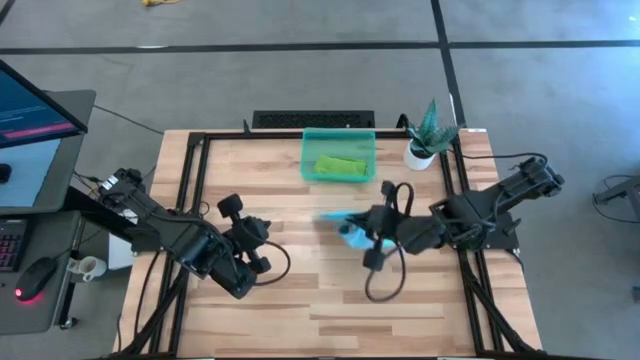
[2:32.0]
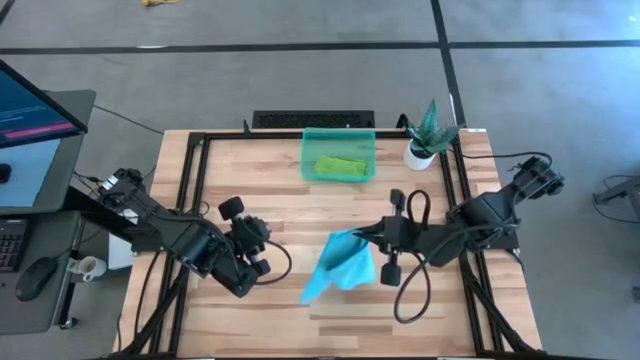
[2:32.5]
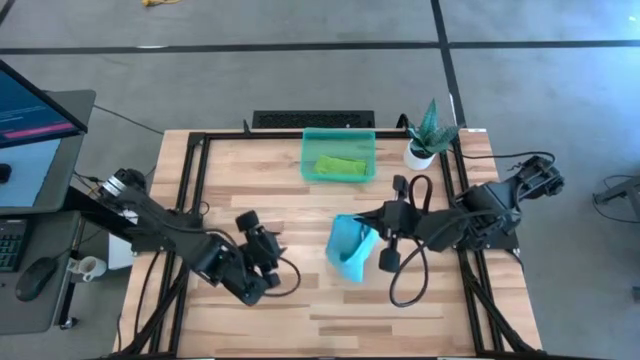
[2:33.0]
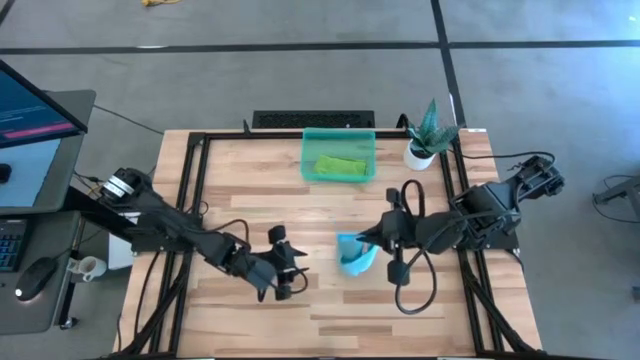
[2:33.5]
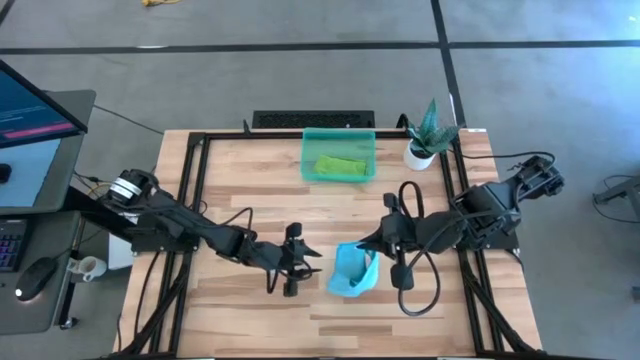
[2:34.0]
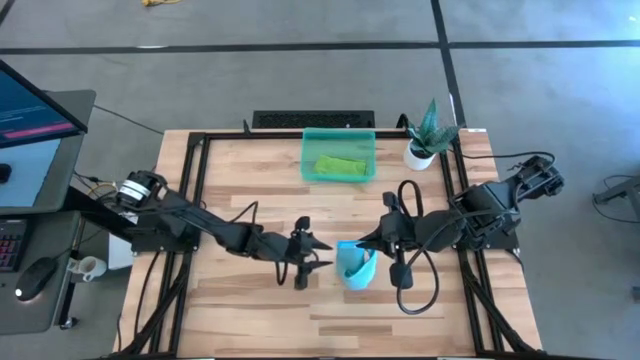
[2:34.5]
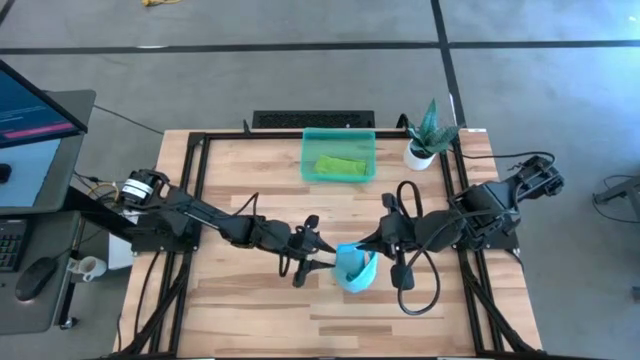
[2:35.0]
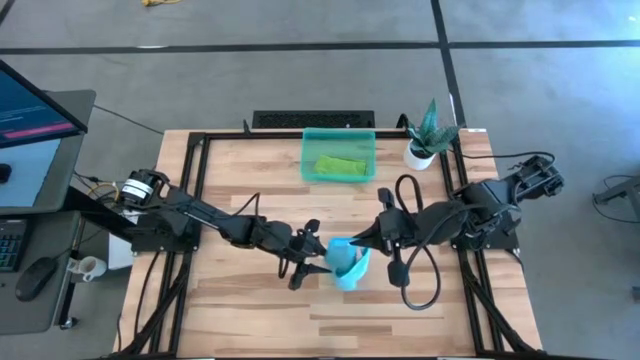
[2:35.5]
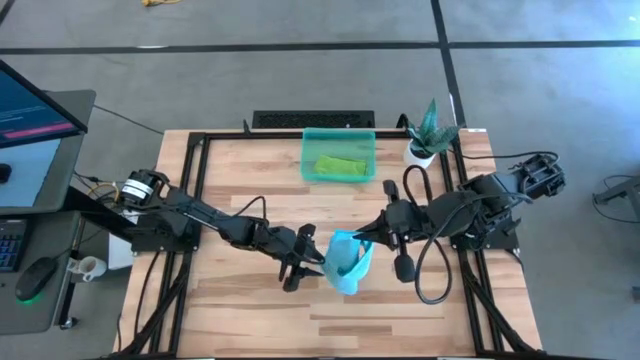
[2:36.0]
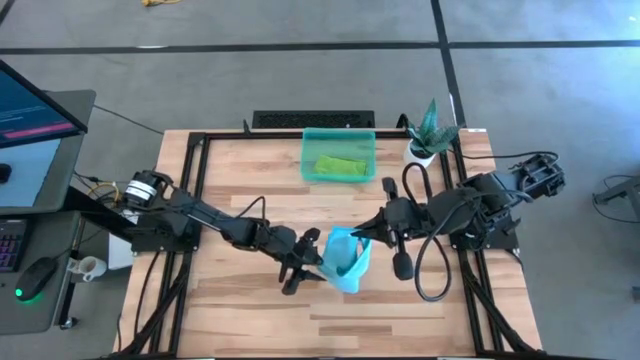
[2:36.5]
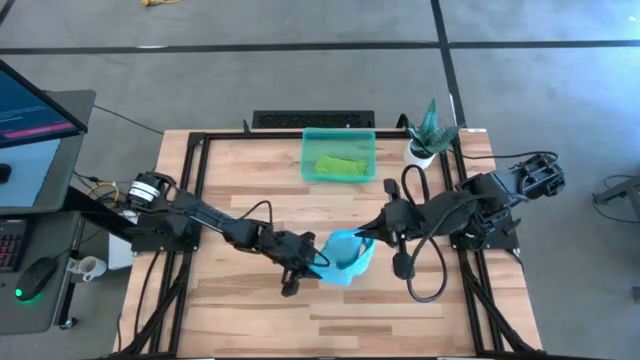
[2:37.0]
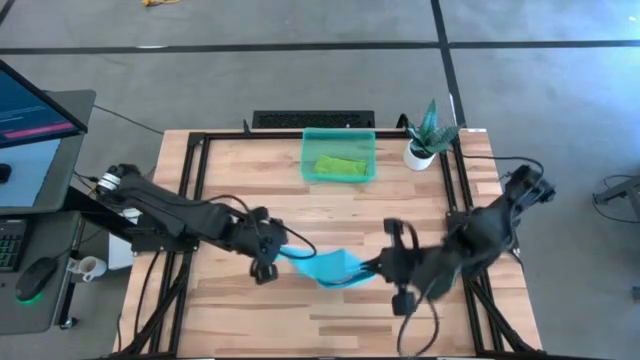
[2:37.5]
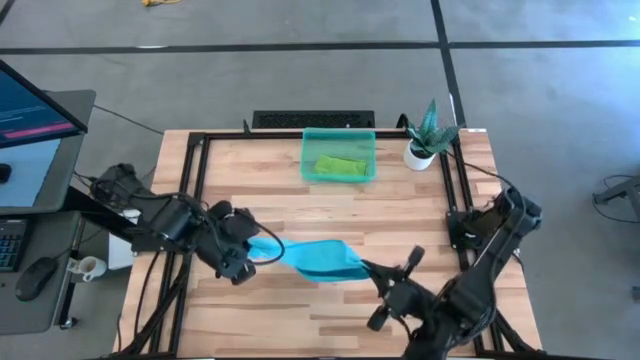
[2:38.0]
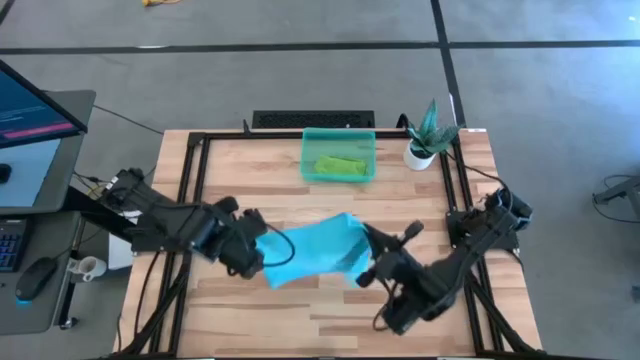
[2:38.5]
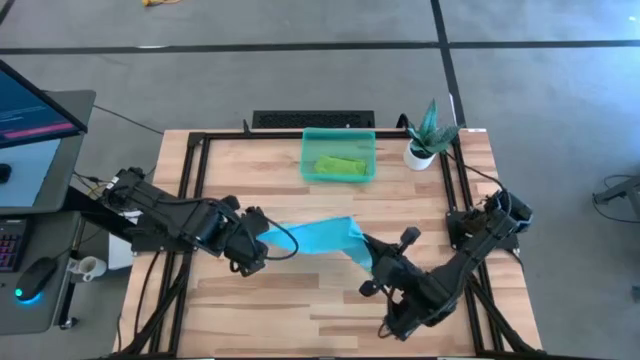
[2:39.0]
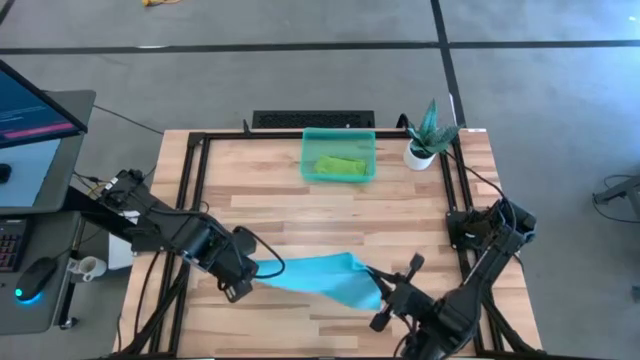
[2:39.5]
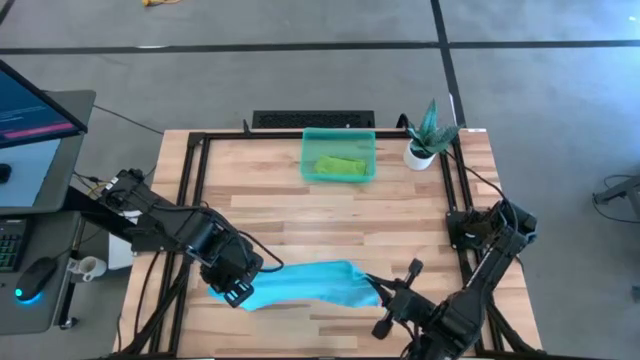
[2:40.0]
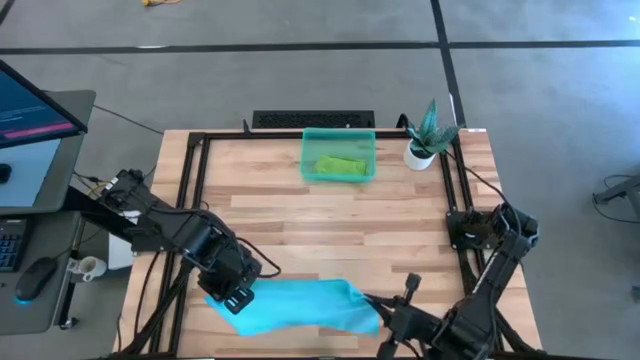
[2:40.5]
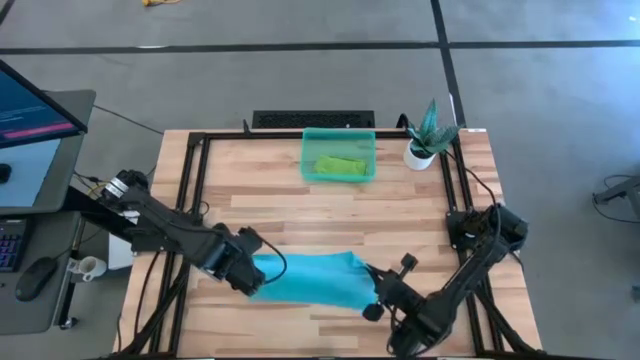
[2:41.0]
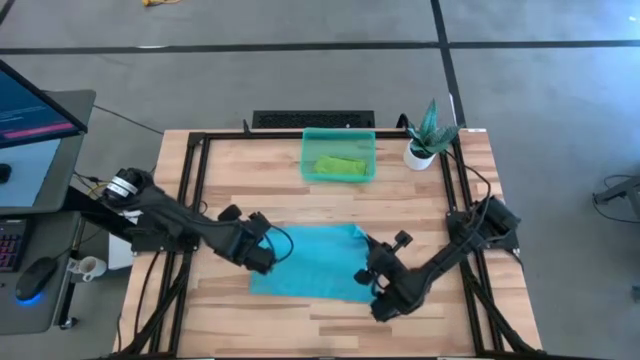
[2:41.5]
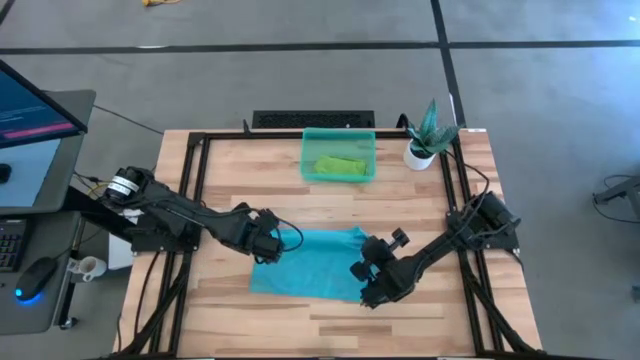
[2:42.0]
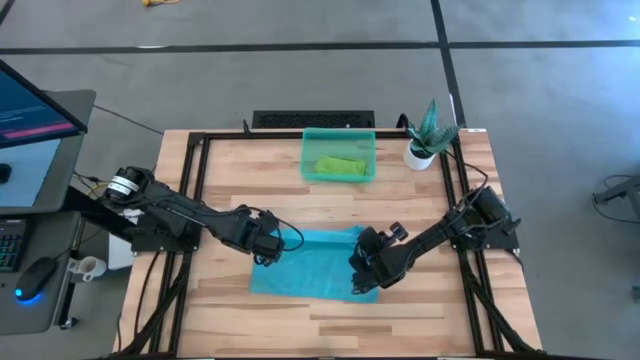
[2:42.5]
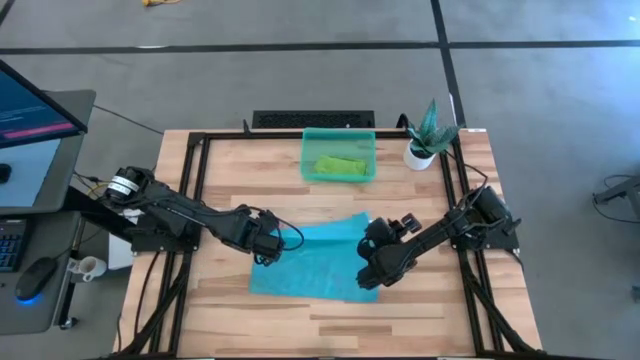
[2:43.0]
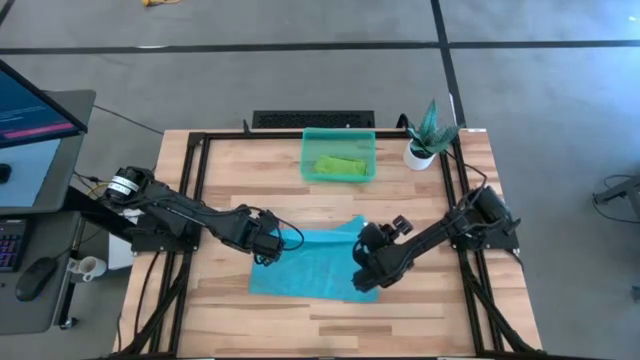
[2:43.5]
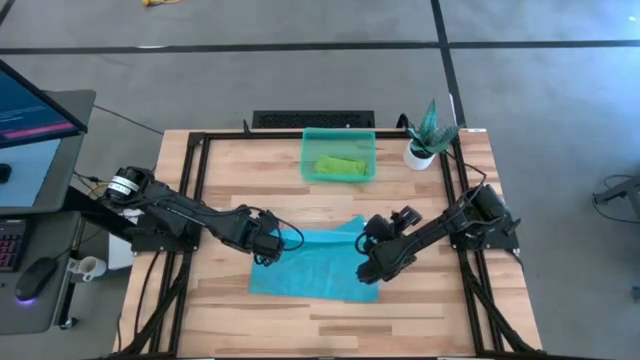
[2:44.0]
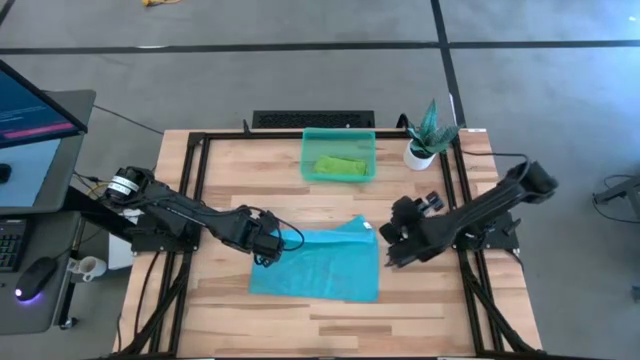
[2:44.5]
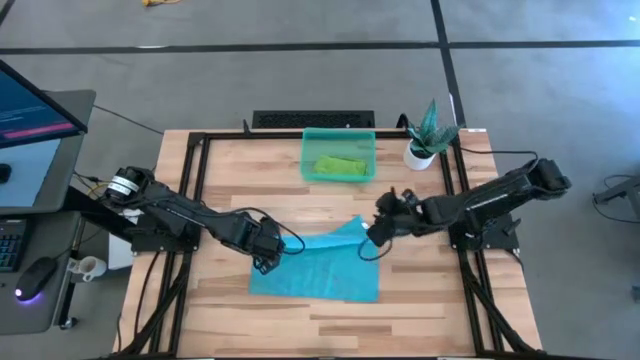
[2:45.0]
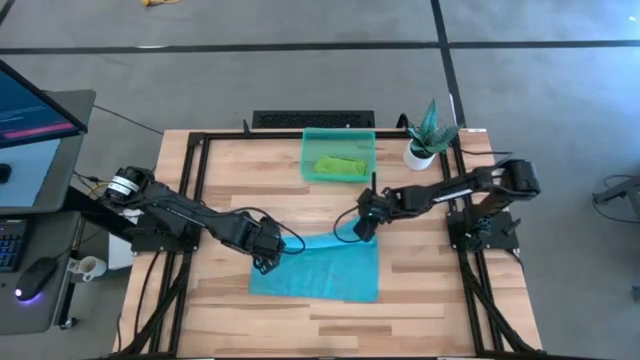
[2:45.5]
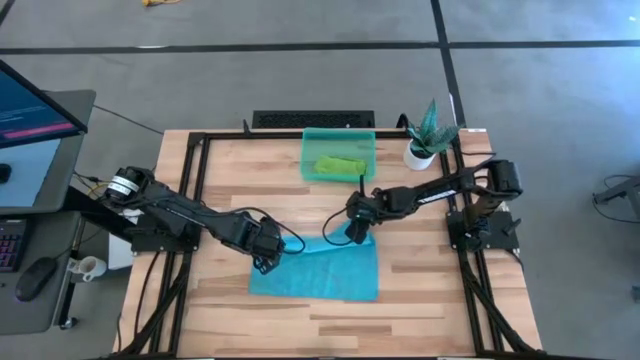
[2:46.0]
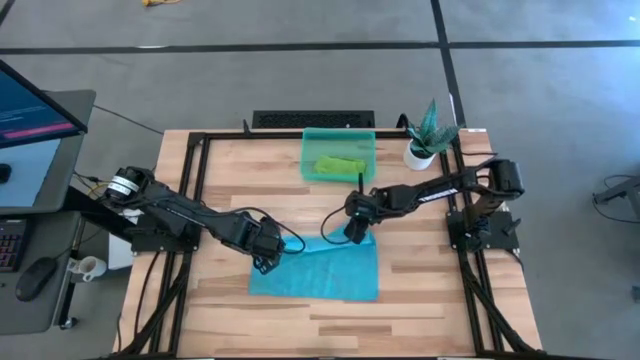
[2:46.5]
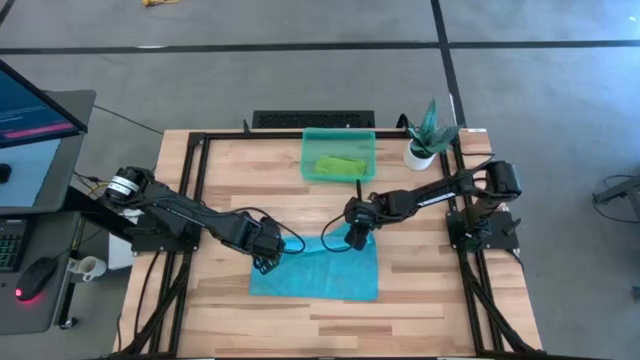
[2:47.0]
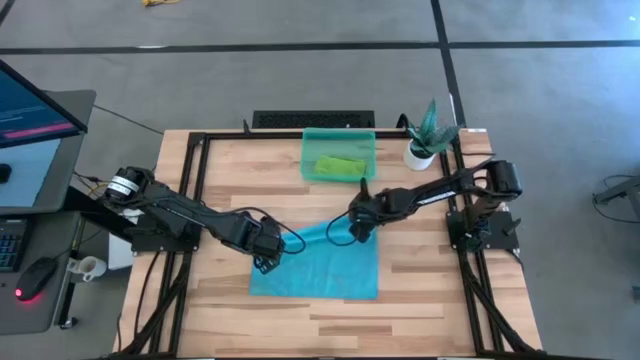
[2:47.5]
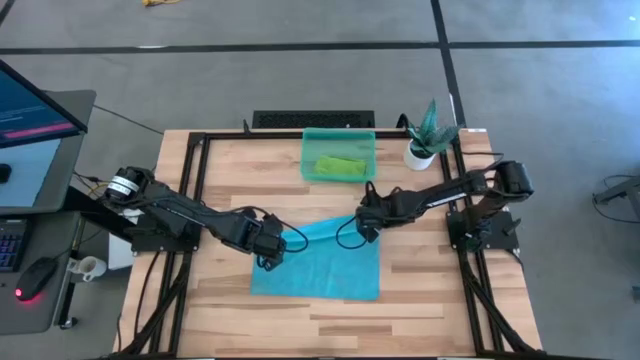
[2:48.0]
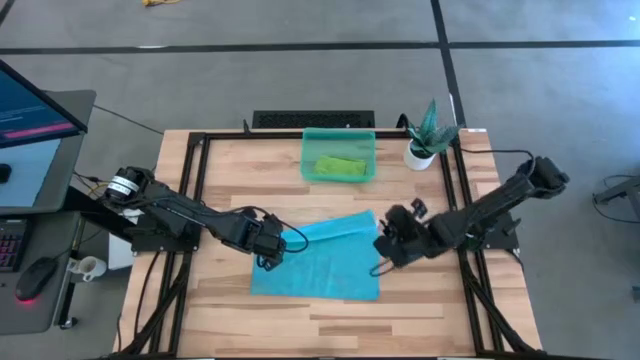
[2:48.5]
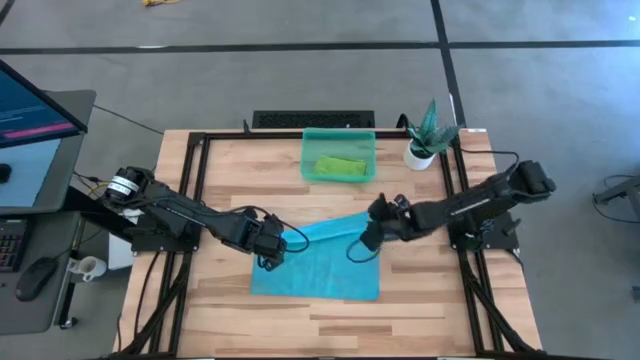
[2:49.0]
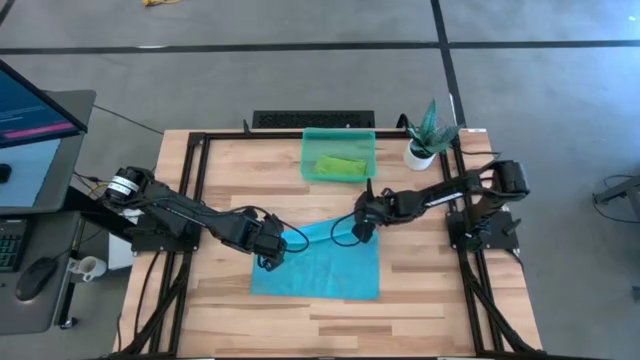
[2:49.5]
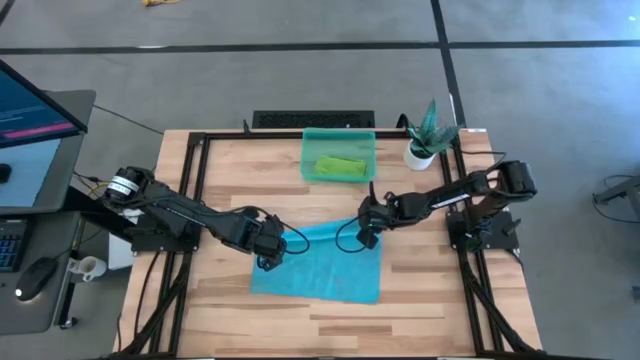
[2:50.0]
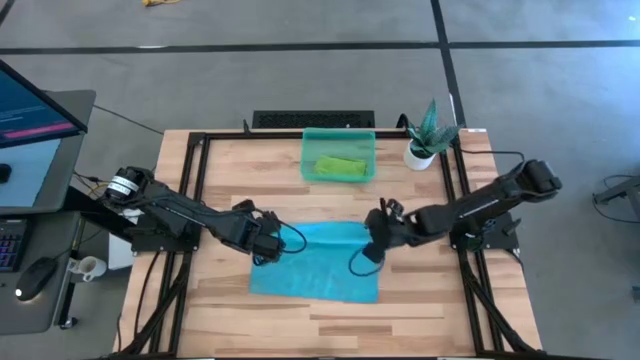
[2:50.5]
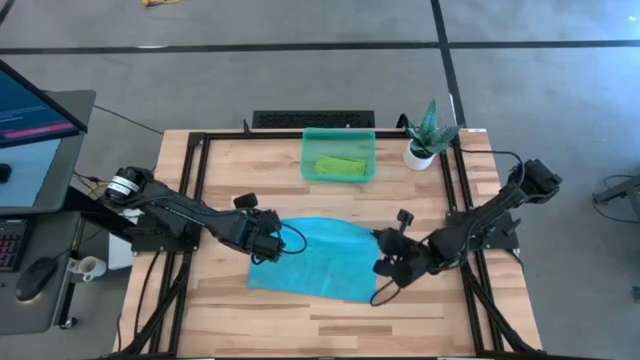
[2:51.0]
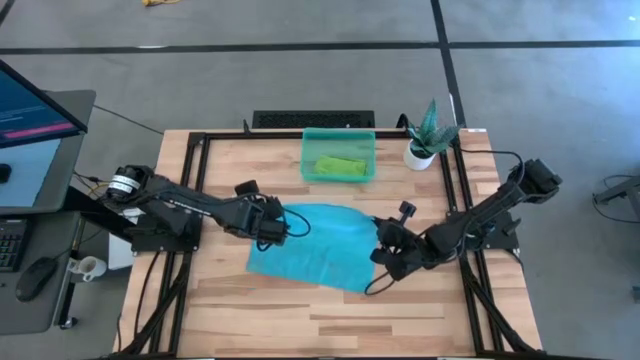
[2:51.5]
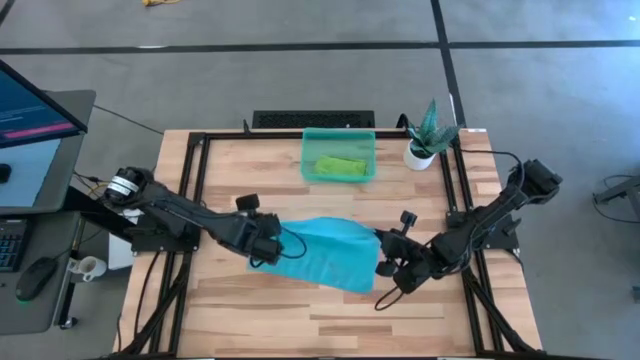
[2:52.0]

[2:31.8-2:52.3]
Task: Roll microfiber towels into tight, uniform cylinder then place into a basket
Fold the blue microfiber cloth

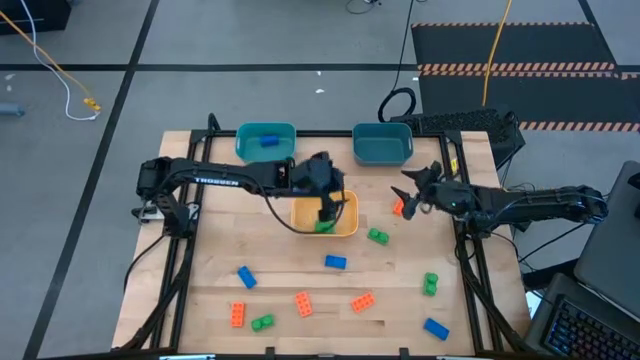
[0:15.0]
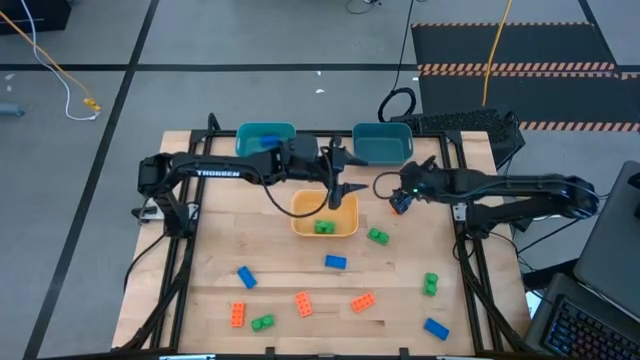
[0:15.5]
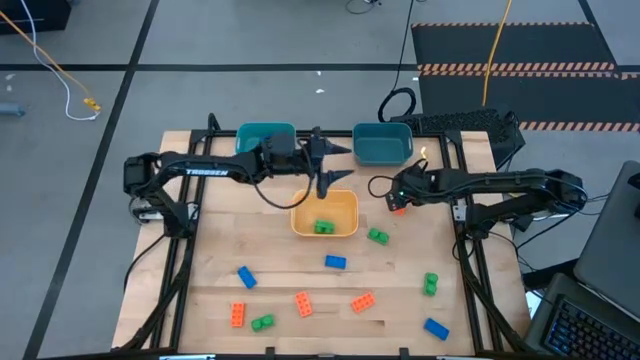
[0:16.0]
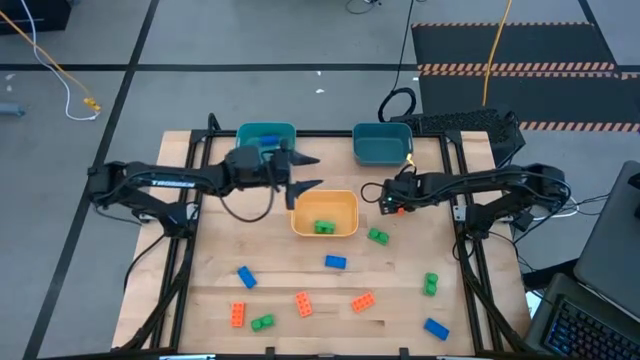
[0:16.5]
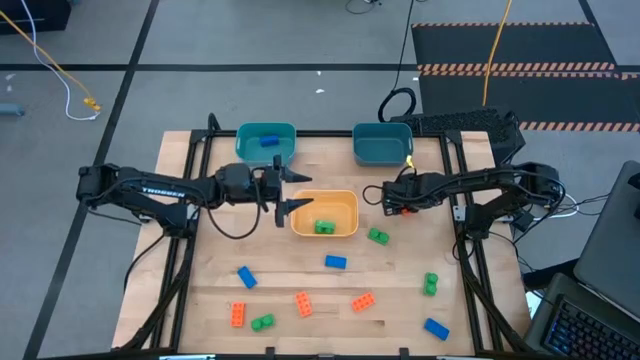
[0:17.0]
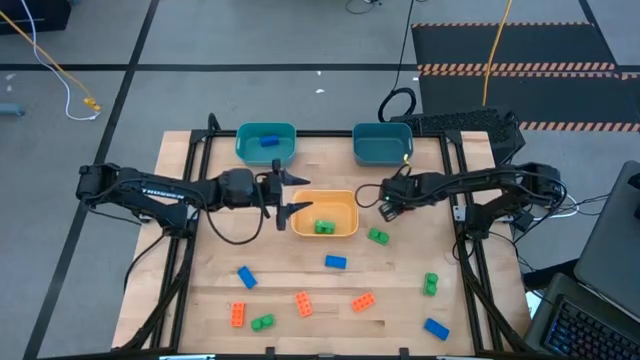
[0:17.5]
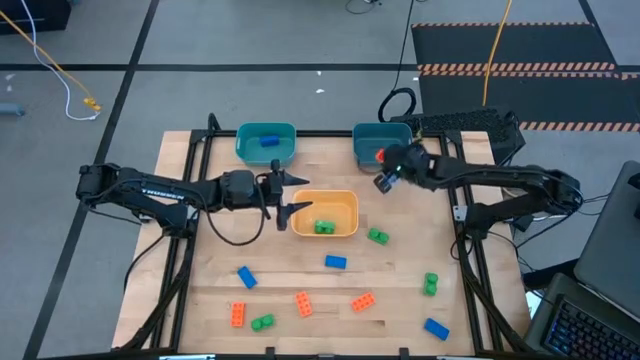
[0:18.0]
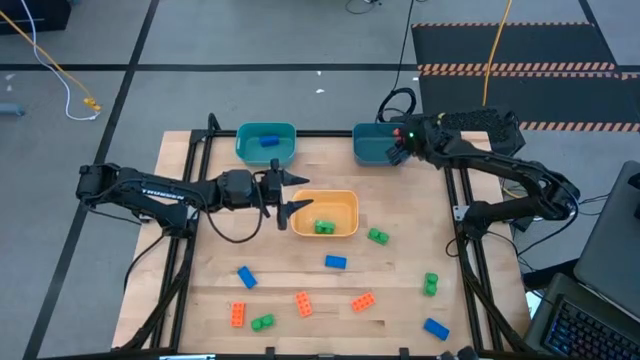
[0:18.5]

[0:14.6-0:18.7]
Task: Sort & place blocks by color
Put the orange game piece into the blue bin
